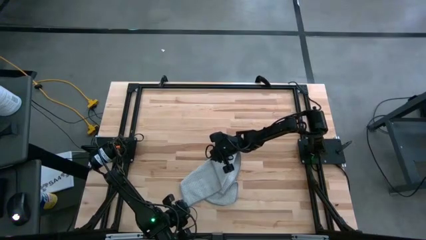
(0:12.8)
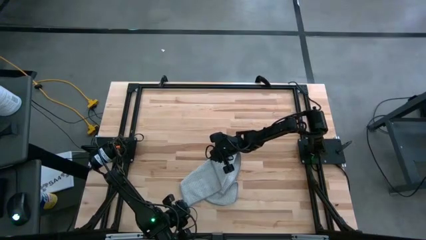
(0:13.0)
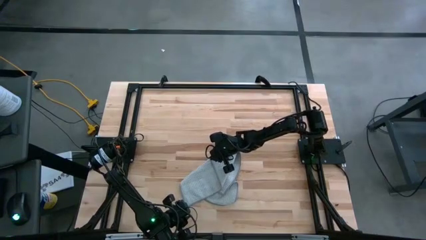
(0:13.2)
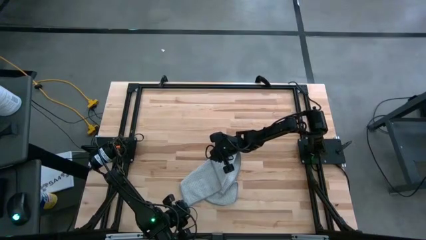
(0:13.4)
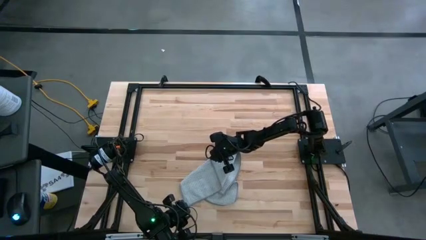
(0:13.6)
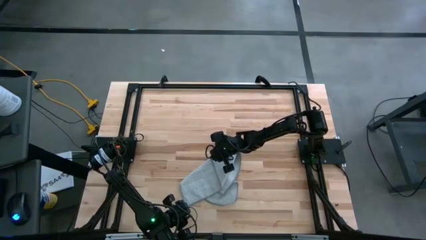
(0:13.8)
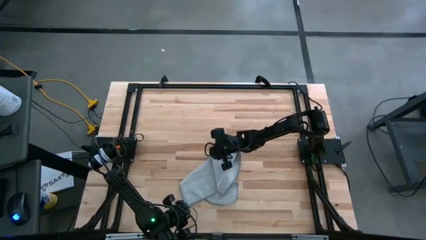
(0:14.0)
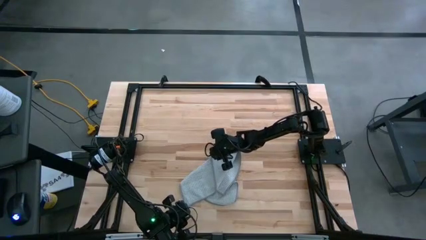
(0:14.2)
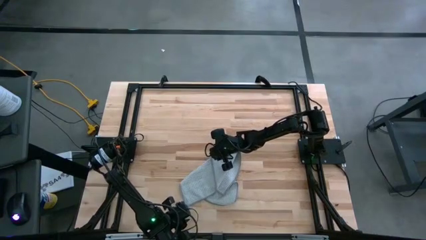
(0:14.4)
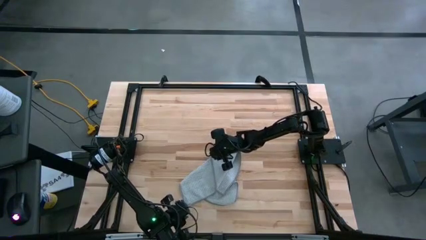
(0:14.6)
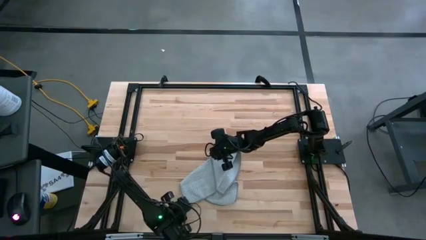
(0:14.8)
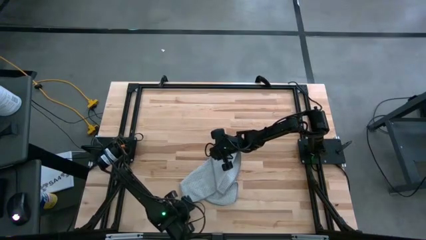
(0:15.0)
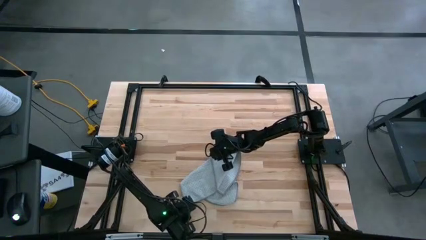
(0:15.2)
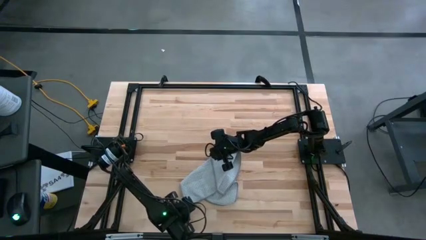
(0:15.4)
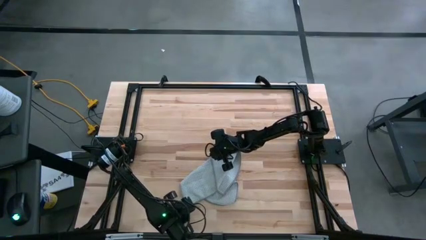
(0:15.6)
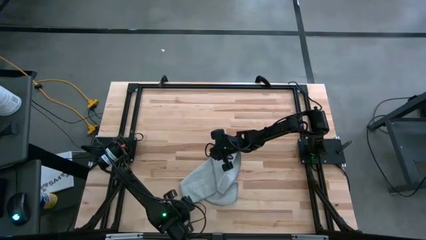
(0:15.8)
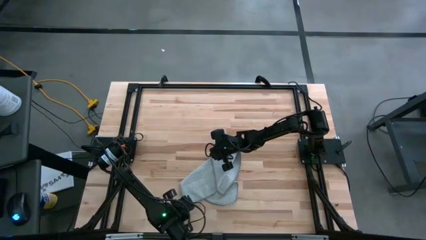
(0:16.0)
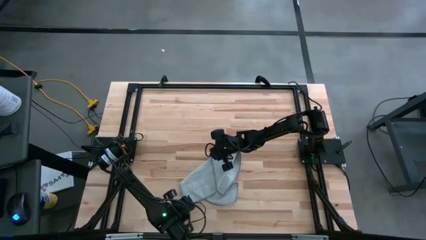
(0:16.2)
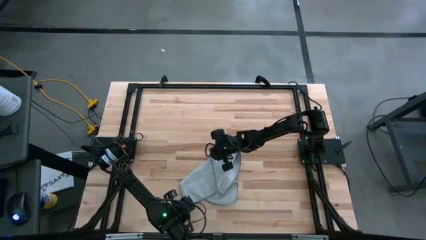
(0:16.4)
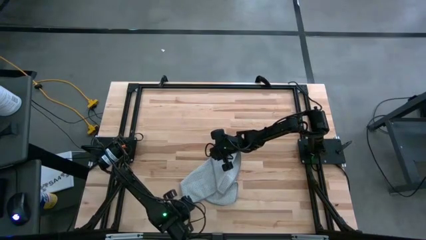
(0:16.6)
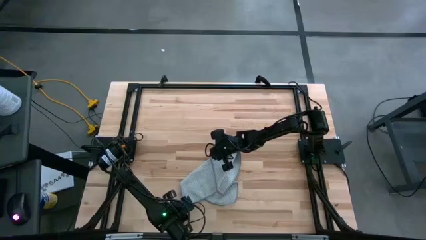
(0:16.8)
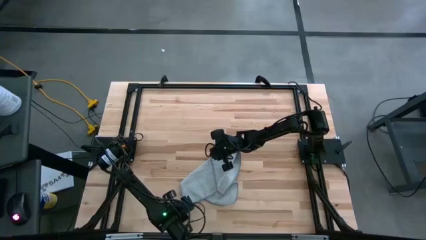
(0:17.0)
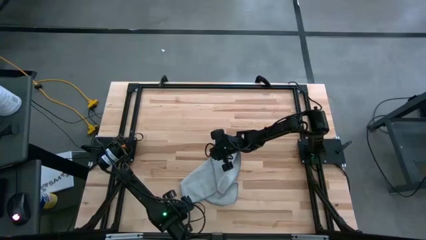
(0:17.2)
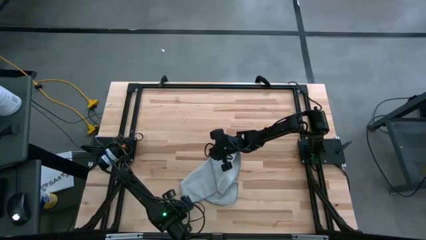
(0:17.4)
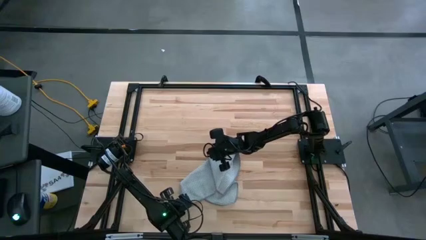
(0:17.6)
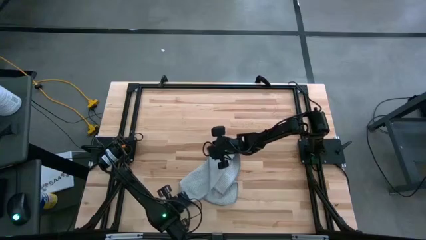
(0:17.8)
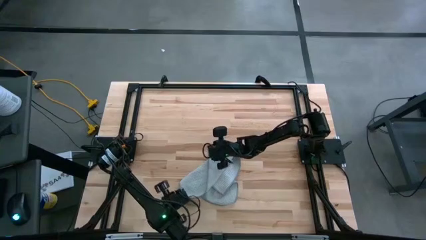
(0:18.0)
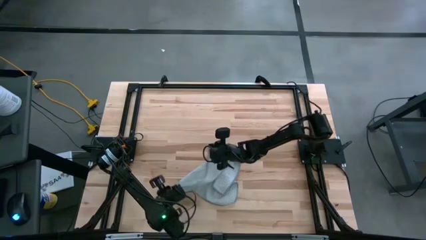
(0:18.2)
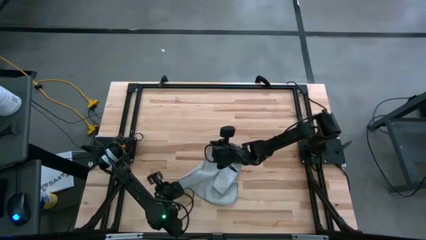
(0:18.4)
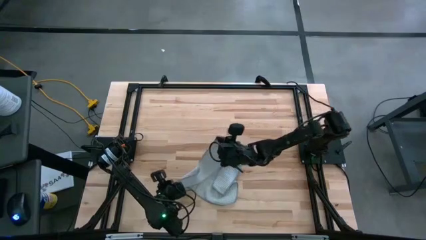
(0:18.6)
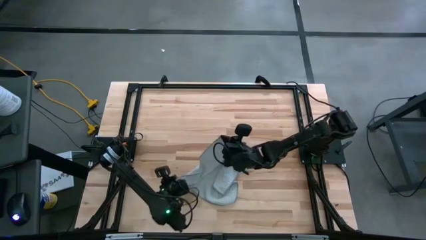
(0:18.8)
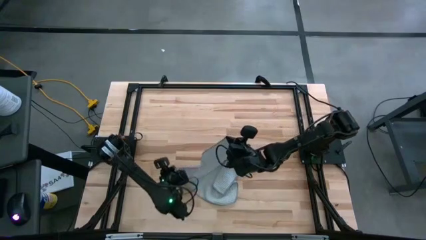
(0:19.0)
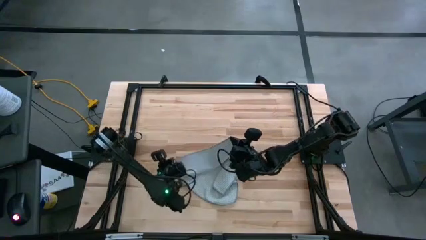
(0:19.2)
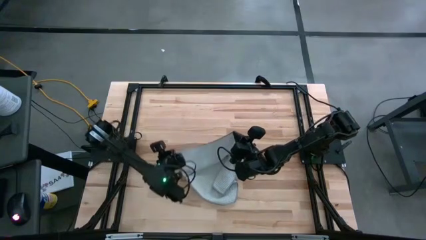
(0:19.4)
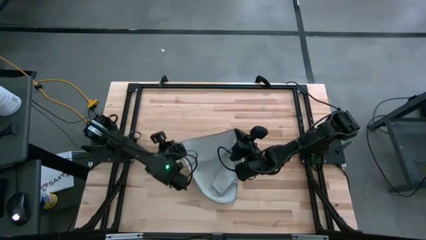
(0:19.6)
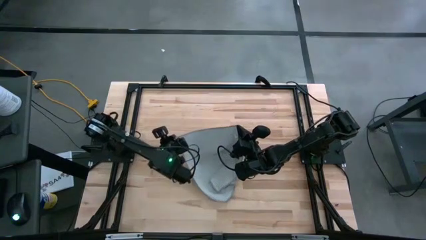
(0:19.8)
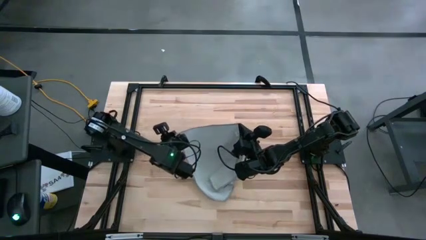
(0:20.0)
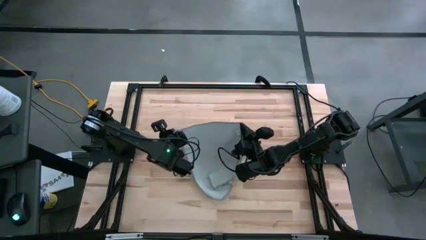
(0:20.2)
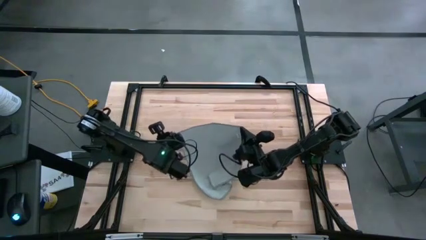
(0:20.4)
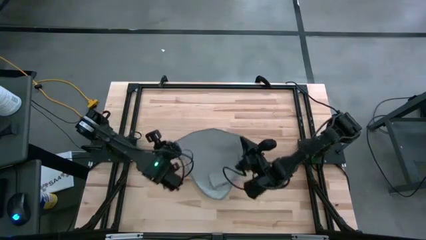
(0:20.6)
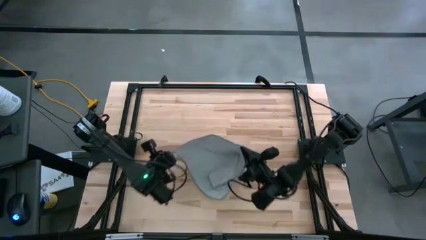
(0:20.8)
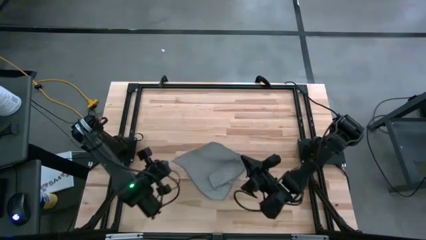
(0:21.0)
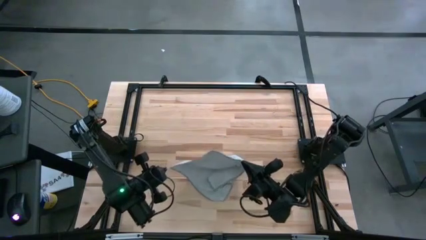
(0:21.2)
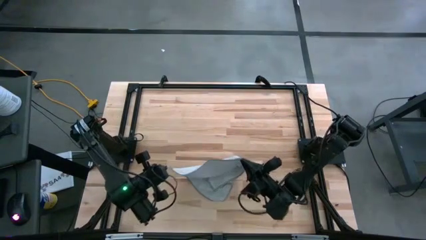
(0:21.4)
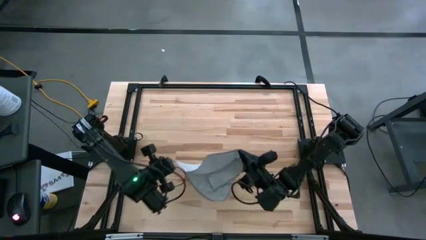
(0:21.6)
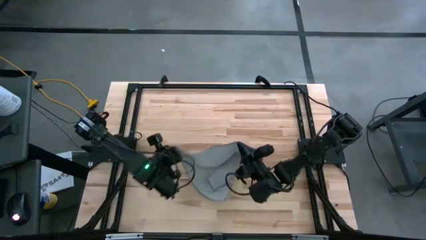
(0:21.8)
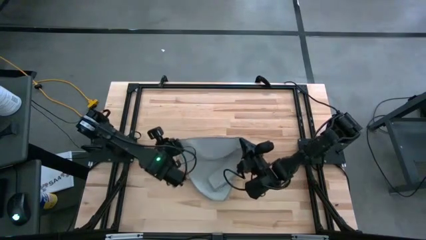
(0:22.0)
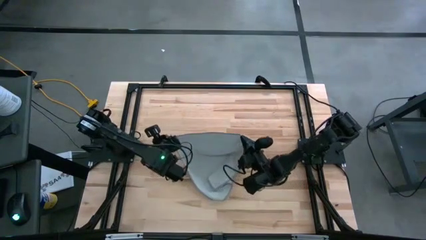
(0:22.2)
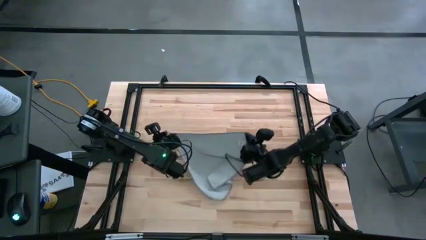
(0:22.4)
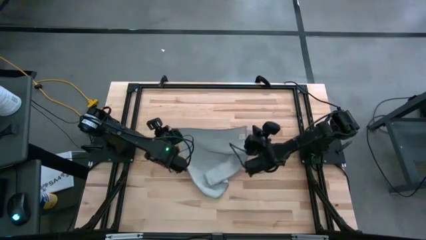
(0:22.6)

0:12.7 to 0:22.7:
Task: Fold microfiber towels
Fold the gray towel on the table
